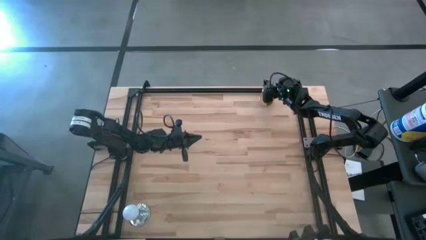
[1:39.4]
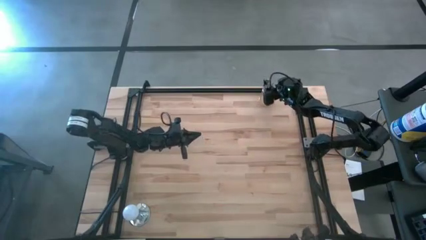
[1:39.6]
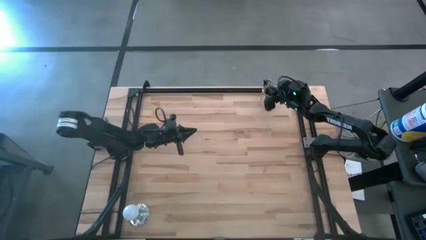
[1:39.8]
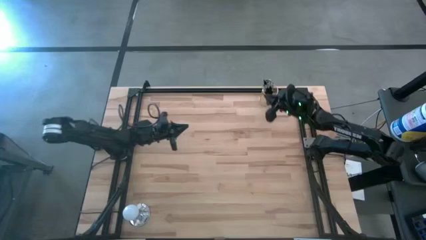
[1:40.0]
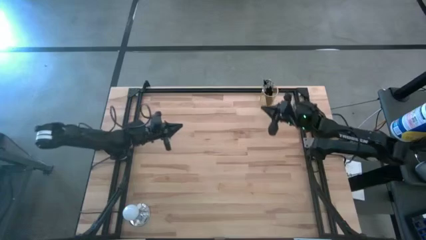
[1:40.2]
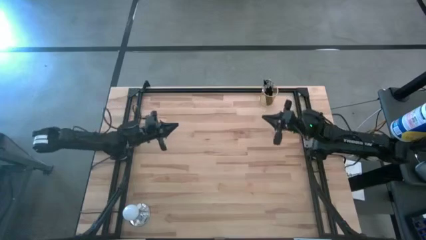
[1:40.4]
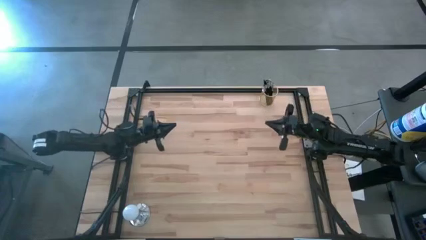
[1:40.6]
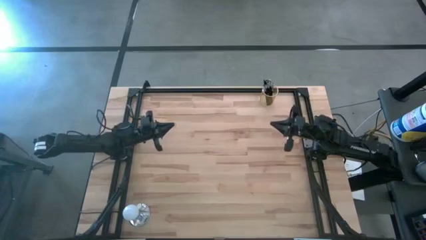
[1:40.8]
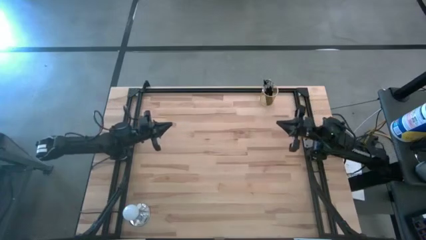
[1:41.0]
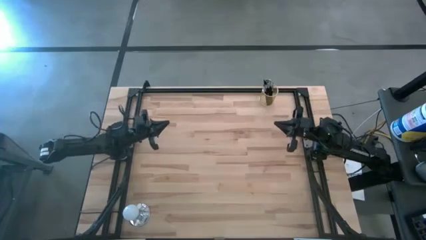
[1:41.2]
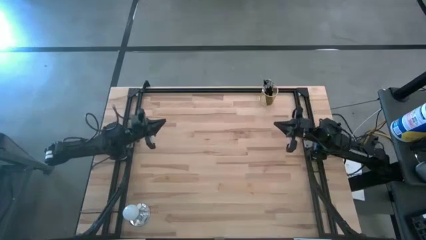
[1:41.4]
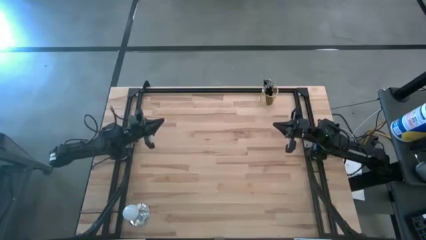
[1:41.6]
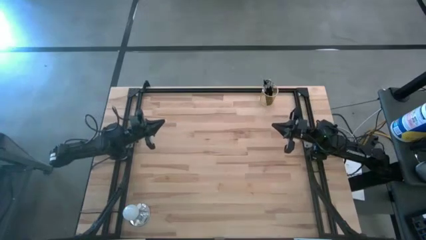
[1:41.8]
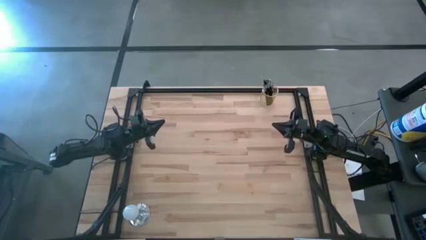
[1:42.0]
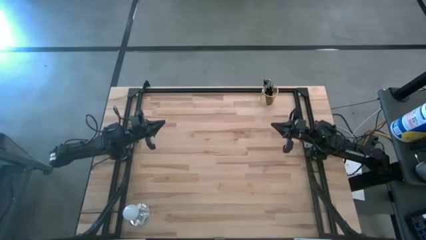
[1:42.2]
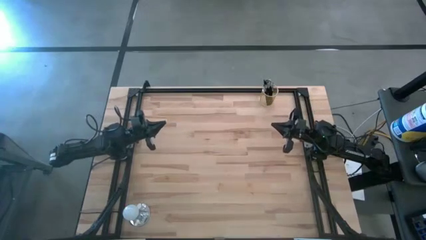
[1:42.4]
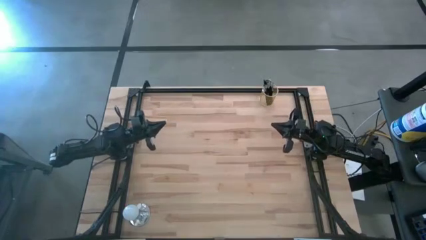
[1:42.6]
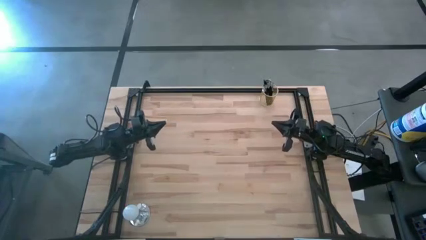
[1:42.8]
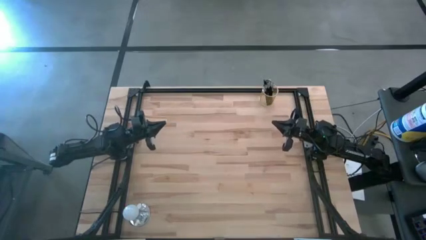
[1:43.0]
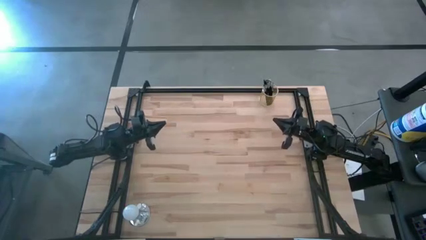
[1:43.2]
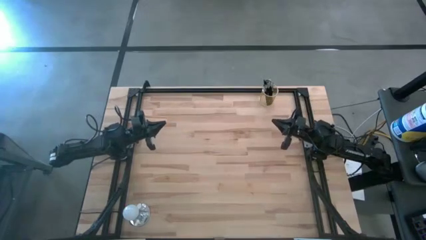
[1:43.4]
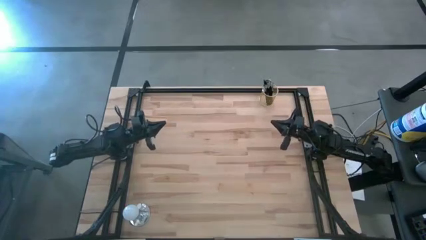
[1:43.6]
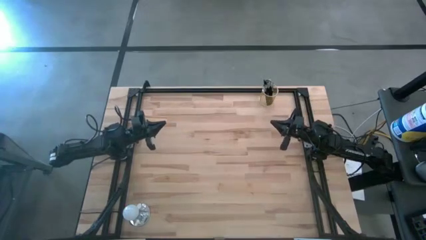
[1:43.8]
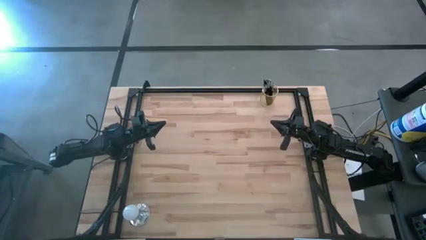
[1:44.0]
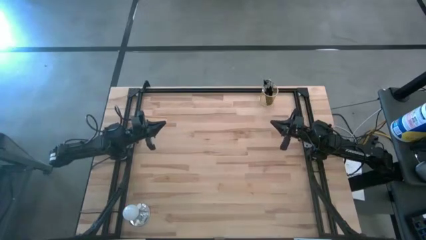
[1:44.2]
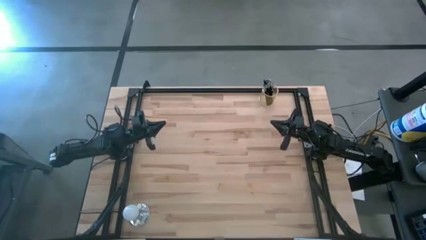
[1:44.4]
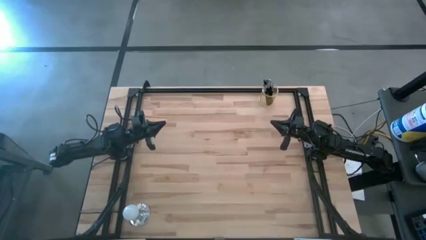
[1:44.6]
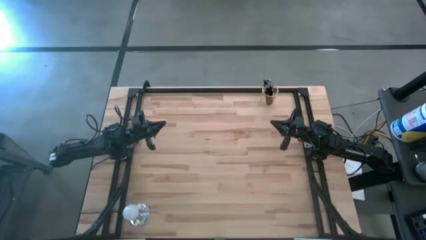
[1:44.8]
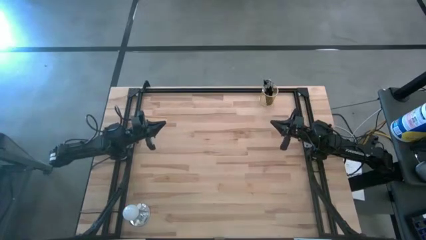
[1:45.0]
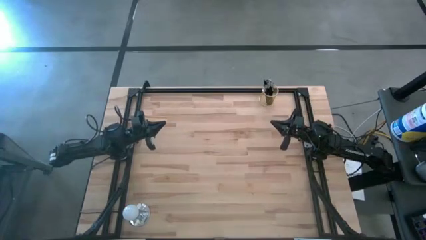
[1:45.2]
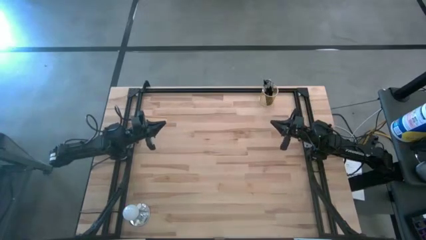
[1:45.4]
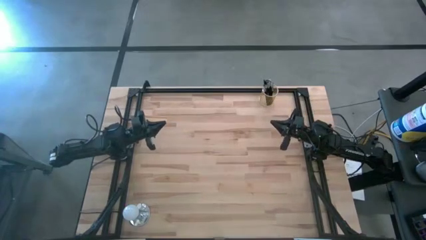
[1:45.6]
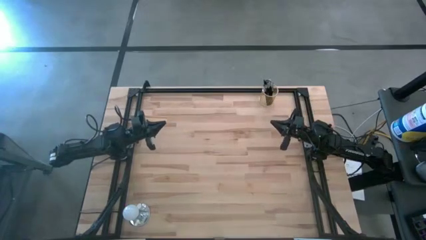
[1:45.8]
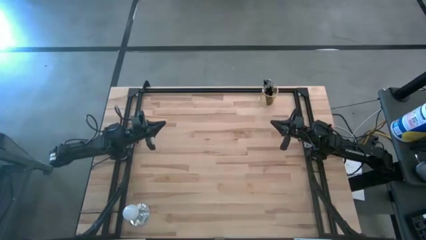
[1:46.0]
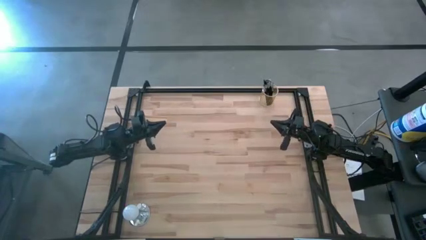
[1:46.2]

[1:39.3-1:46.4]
Task: Put items in baskets/containers
Return to Home Position

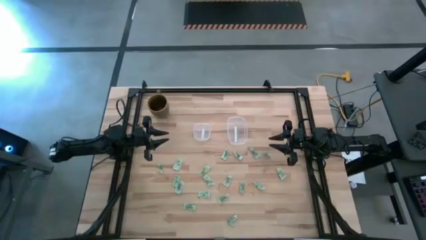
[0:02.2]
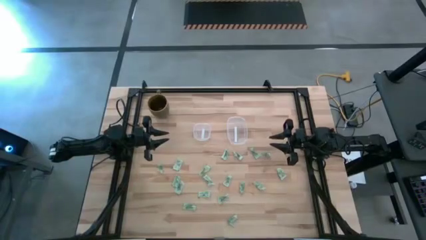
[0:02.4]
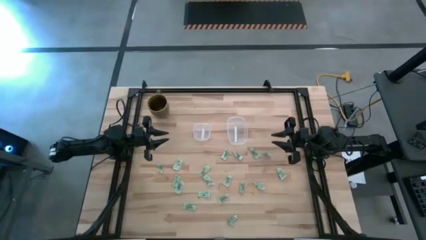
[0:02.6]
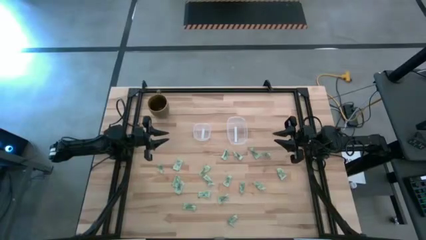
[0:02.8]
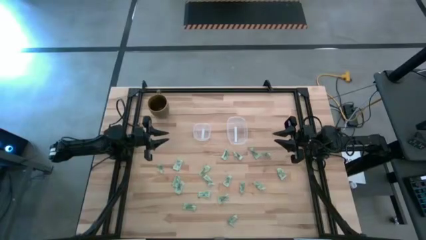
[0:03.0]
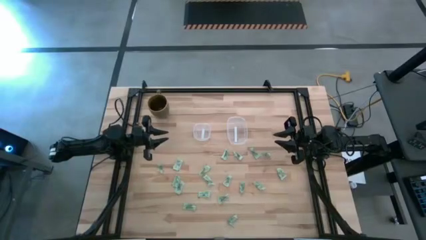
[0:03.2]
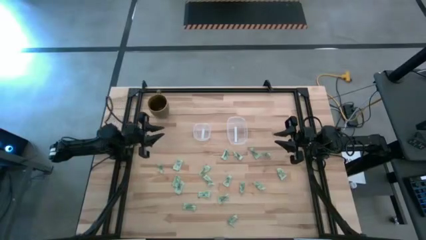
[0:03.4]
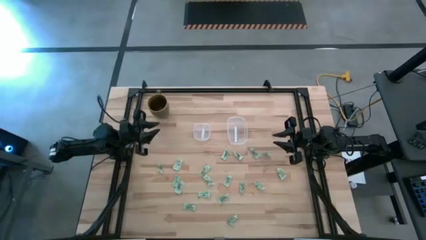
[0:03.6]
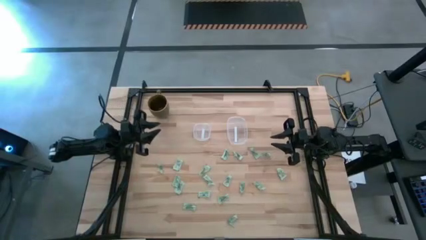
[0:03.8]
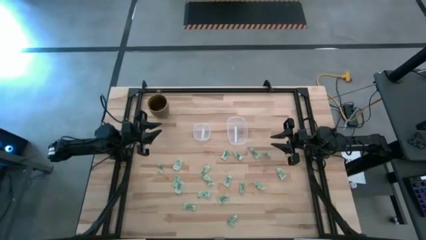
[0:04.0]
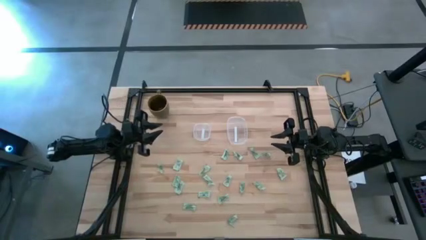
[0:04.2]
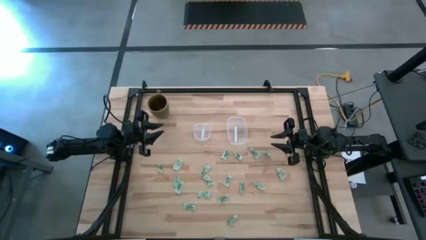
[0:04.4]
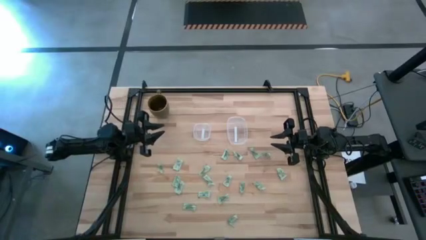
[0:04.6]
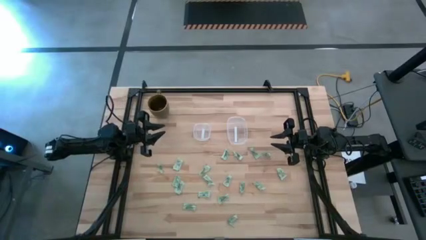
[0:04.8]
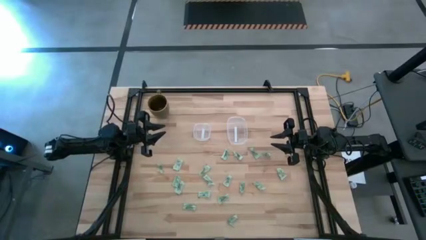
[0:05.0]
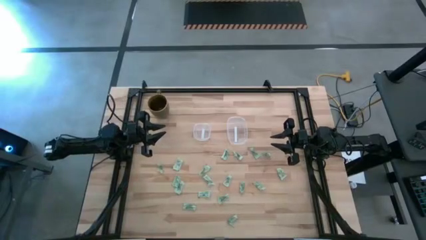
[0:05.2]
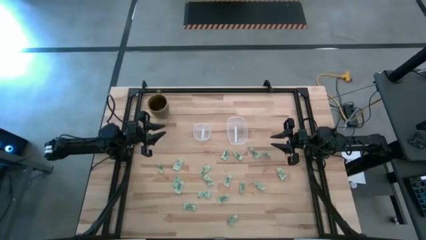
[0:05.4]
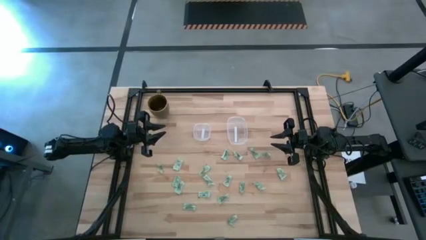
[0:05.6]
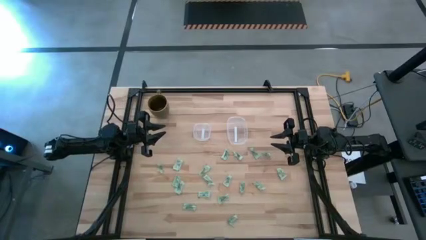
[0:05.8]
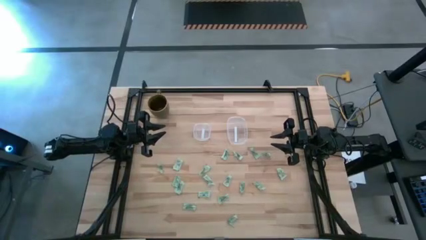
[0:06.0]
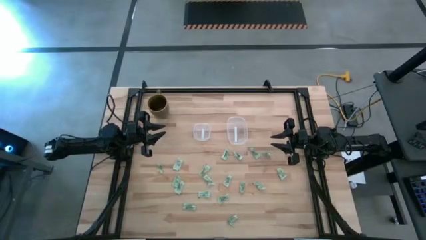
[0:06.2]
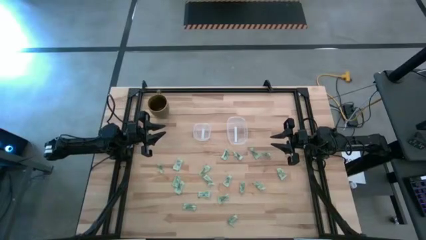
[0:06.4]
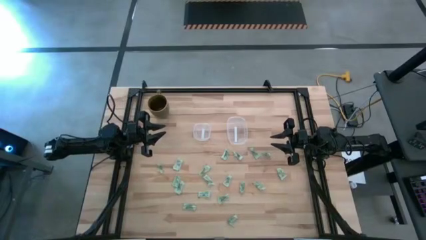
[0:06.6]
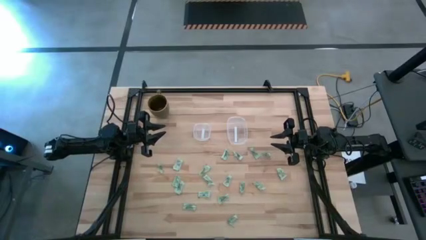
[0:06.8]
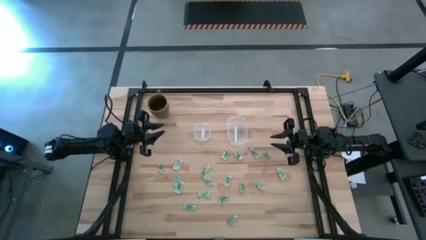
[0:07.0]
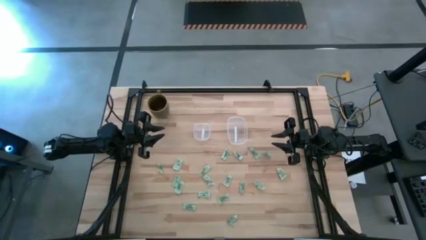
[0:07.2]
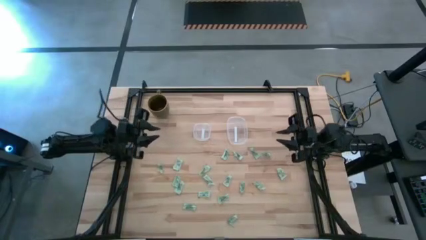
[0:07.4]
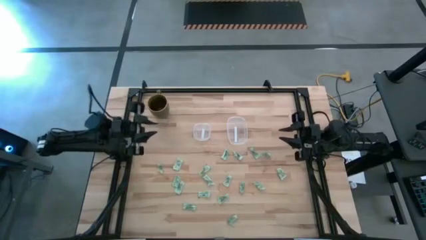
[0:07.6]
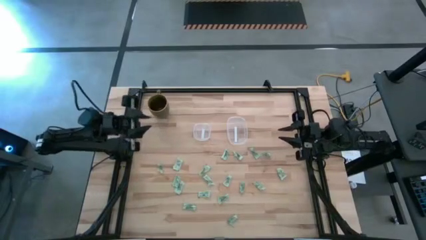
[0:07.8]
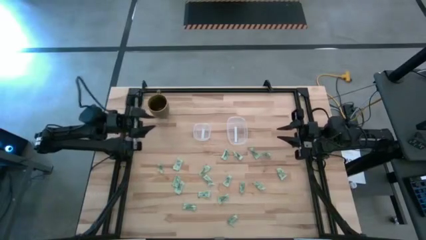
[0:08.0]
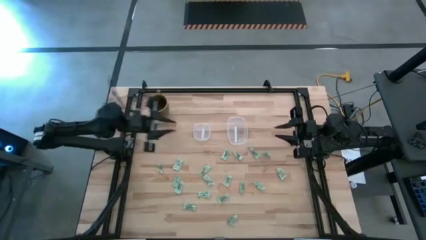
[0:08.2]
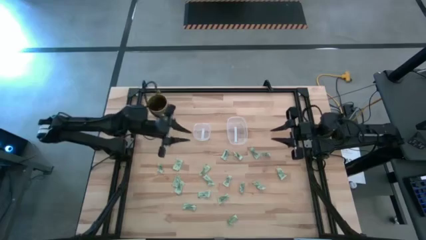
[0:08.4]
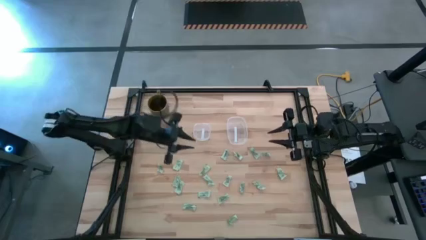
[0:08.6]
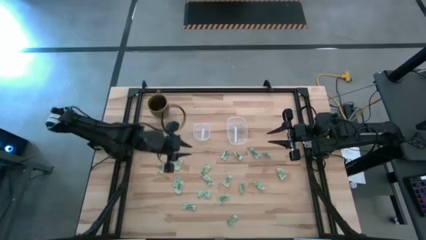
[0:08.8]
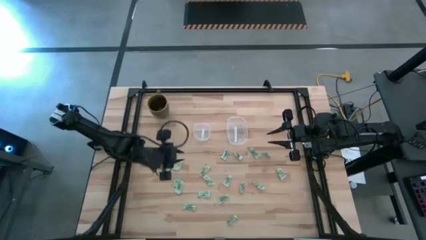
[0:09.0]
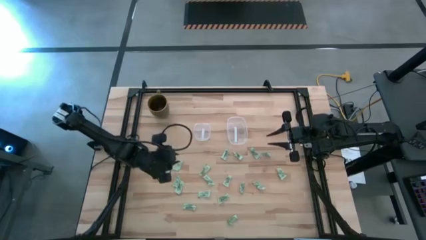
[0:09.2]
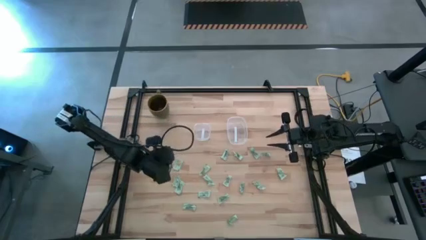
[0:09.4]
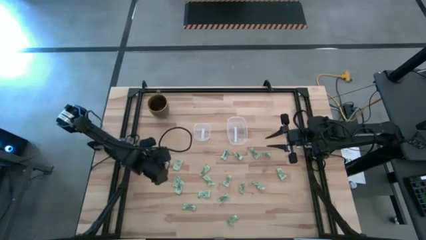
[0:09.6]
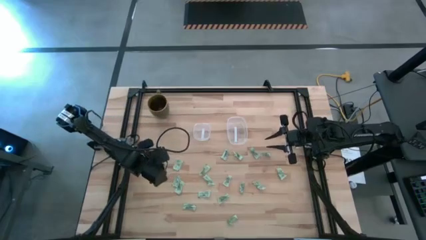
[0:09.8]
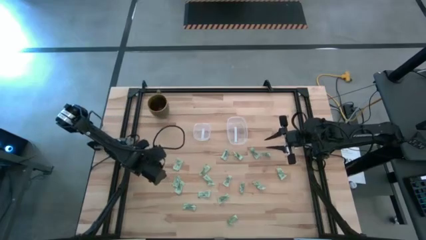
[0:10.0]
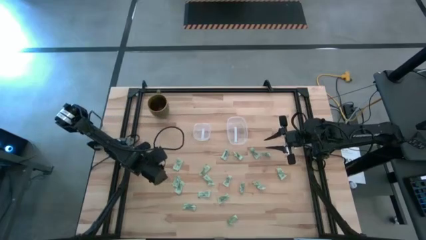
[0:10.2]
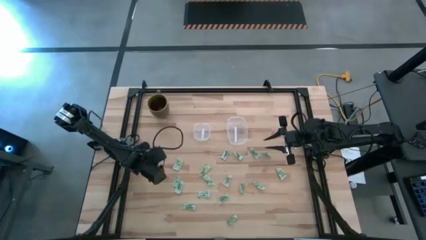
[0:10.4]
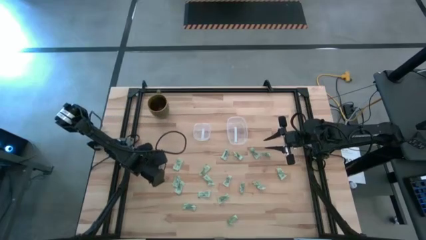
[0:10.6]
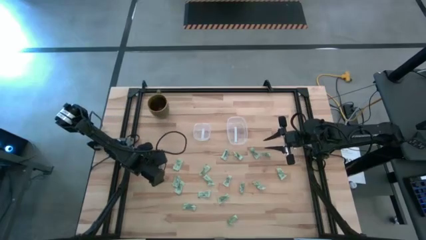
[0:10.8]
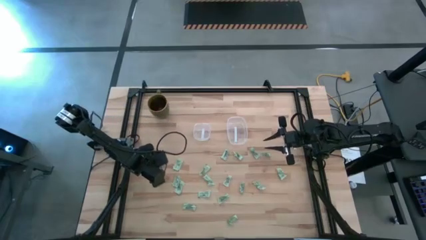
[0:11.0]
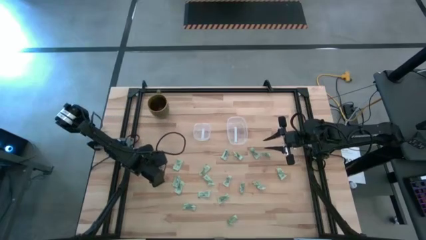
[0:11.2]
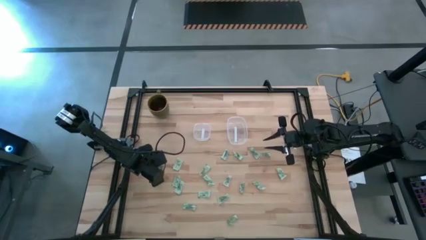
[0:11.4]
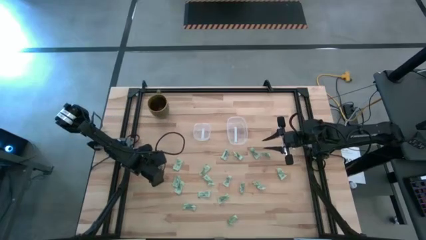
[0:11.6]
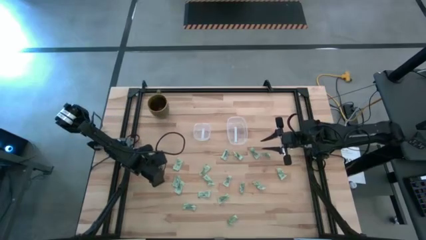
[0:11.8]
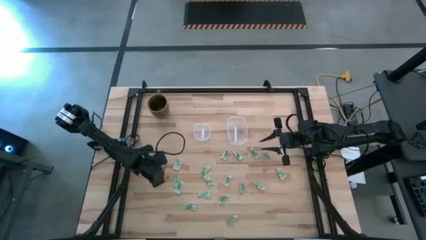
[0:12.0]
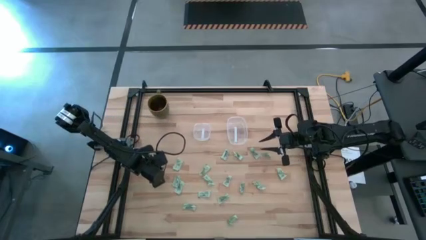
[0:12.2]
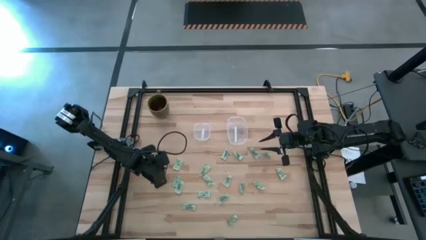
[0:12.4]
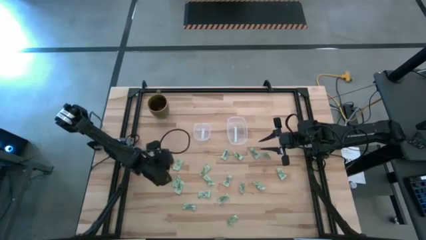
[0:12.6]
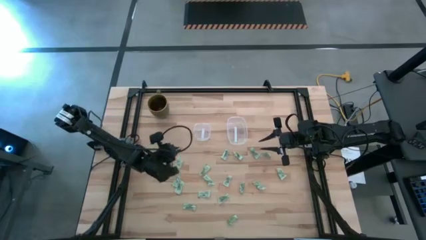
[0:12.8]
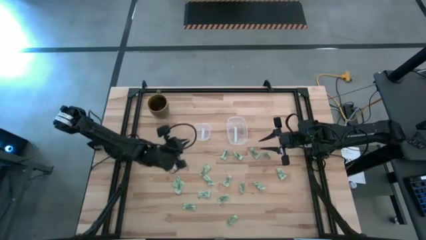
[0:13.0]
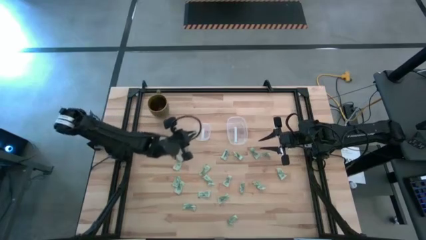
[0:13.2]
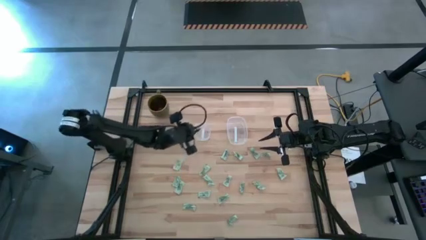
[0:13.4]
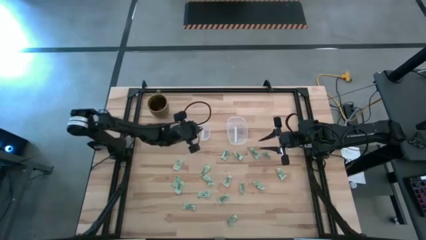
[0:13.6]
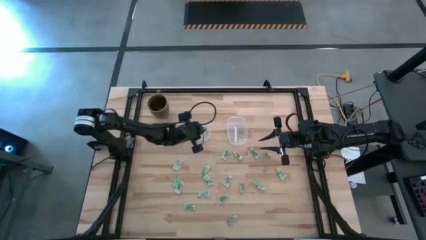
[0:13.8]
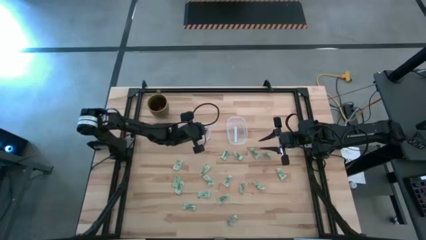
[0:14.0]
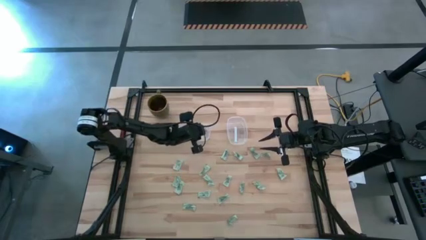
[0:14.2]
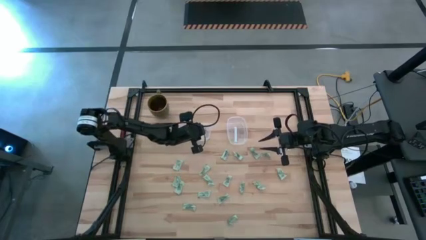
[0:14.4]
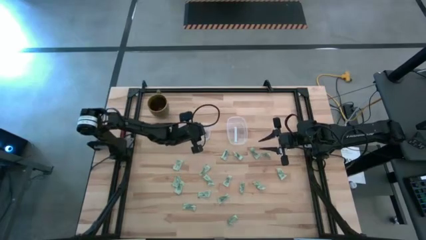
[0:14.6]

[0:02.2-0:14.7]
Task: Pick and place items into bin
Put the light green stevia packet into the left transparent bin
